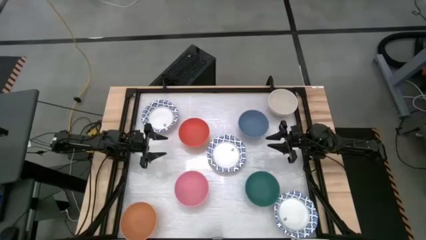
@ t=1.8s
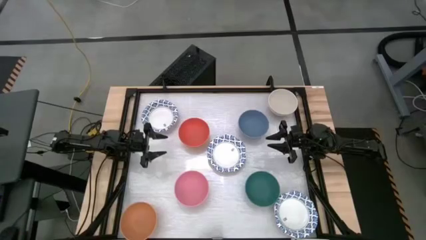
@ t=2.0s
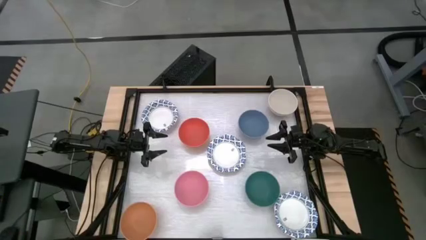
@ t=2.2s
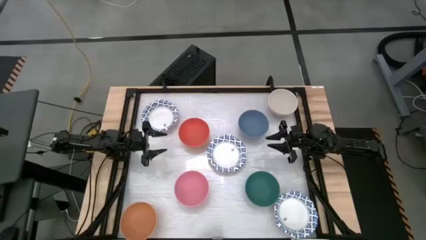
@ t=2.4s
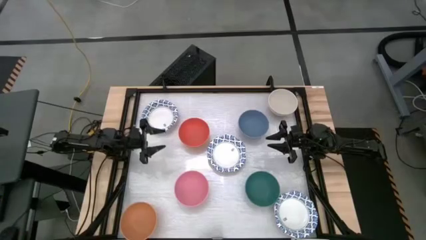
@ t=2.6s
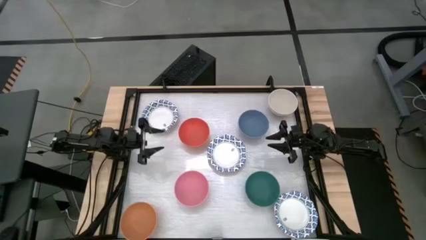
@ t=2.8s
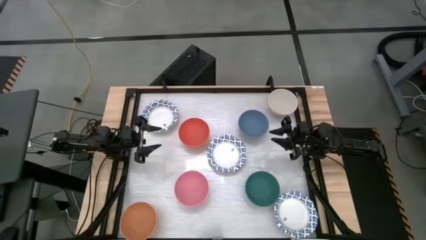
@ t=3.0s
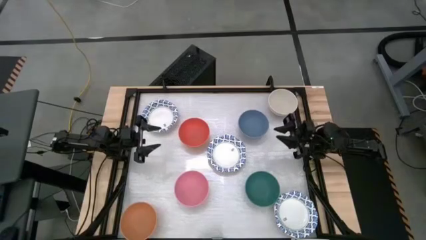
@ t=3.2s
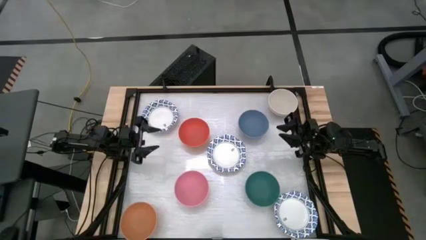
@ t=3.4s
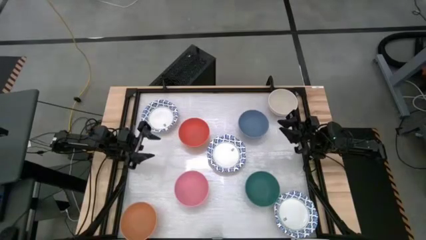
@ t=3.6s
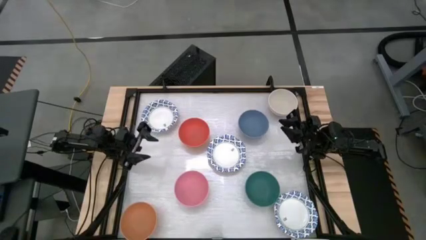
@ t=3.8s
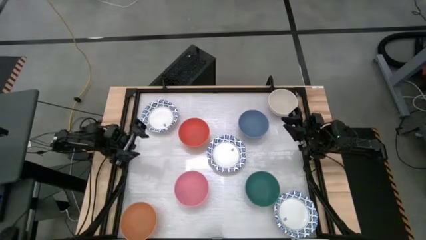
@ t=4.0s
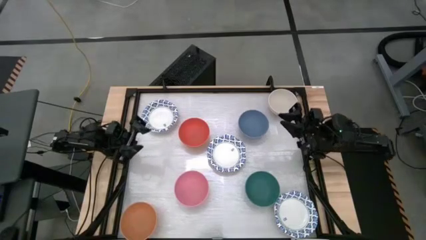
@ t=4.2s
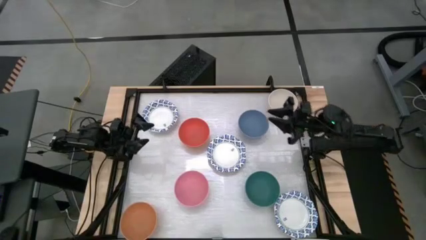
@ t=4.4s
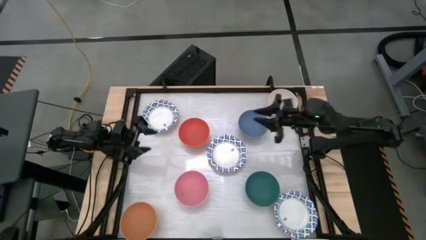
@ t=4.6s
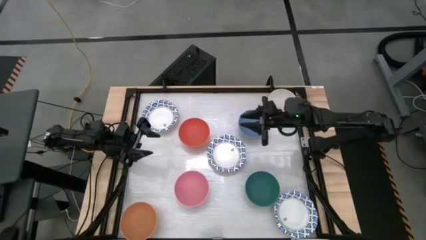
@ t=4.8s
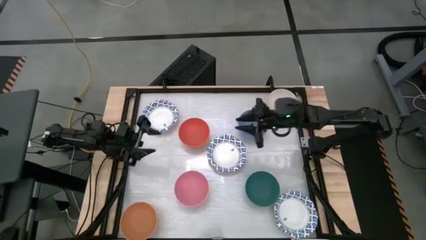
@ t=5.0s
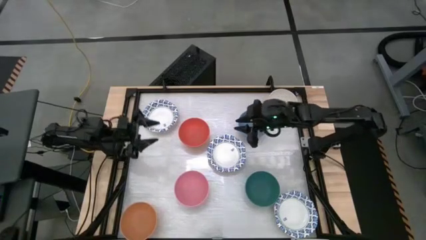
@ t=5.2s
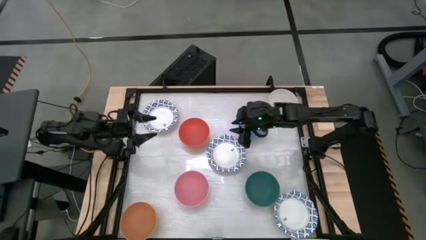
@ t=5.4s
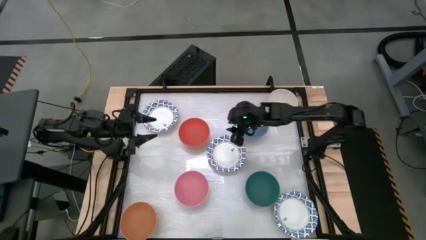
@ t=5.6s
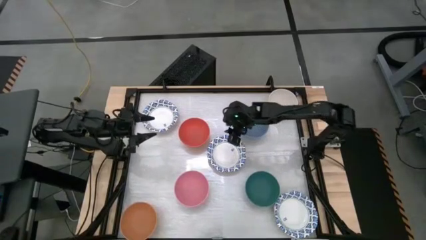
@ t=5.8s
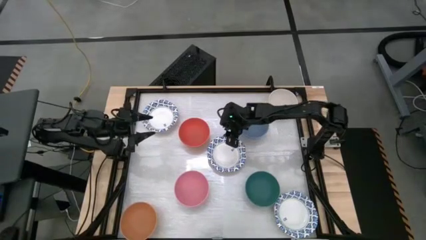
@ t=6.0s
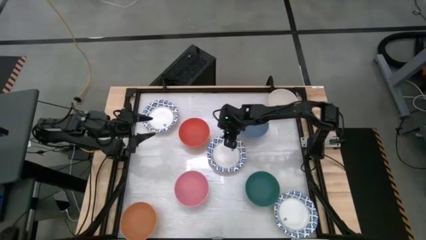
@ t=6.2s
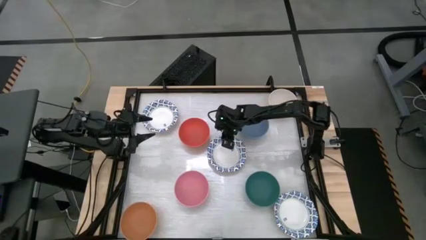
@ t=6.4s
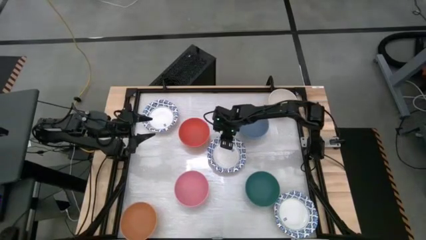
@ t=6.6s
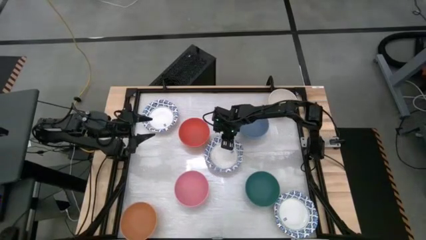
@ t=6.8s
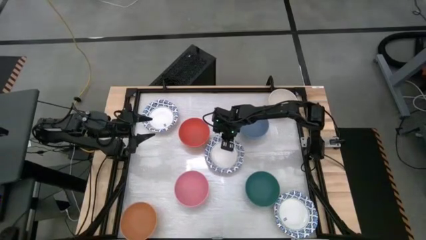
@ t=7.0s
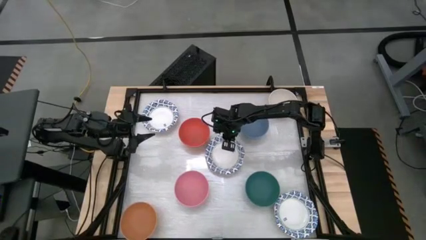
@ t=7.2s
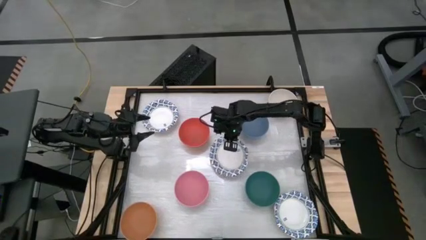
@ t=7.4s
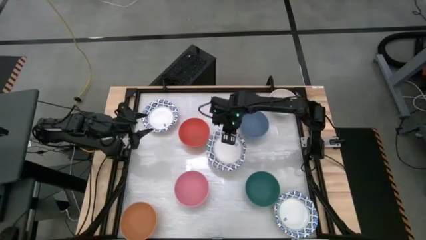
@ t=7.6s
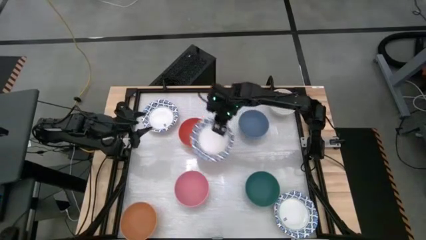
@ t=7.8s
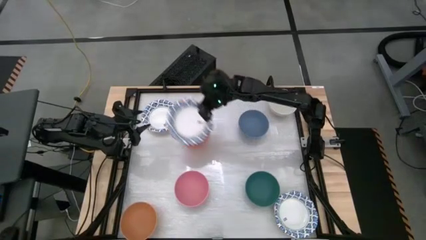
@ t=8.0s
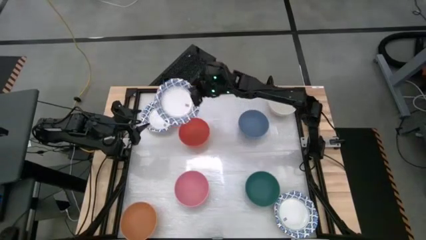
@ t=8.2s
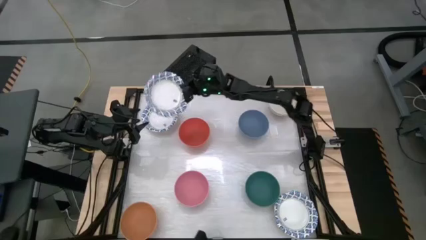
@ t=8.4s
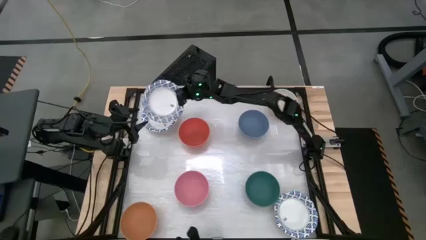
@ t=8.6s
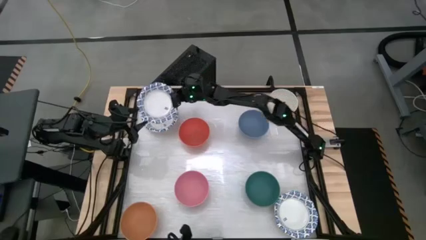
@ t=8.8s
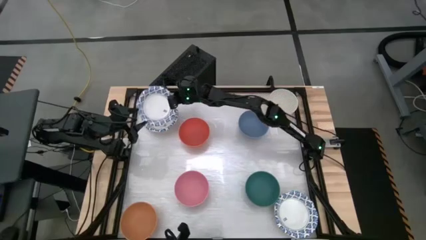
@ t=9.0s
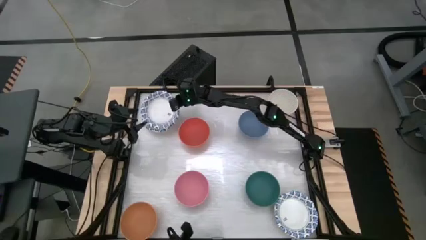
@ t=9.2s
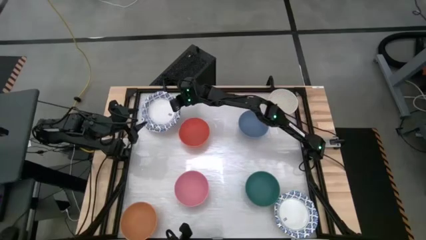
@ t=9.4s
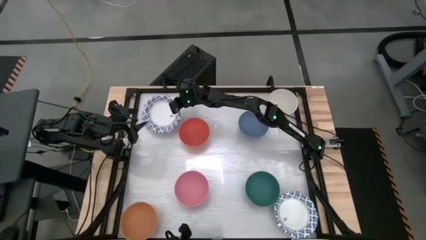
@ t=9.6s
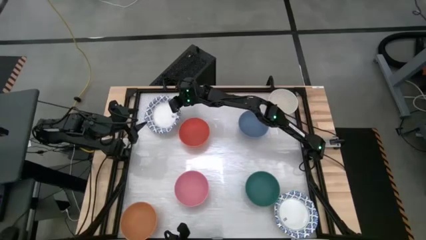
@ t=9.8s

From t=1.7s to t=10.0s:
Stack the middle white pattern bowl on top of the top white pattern bowl

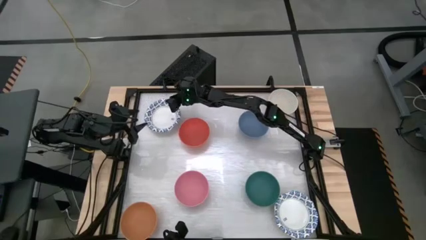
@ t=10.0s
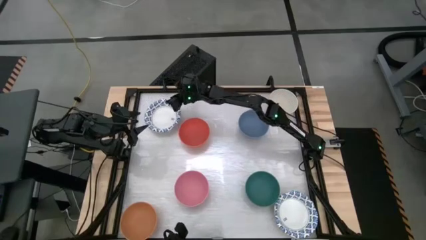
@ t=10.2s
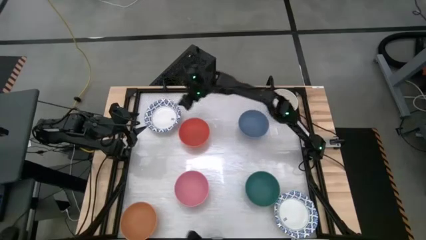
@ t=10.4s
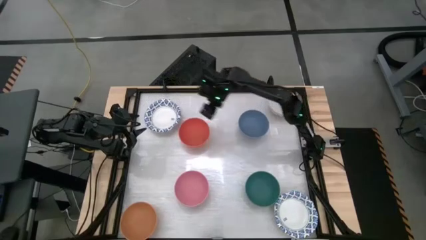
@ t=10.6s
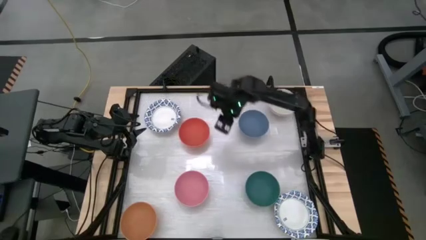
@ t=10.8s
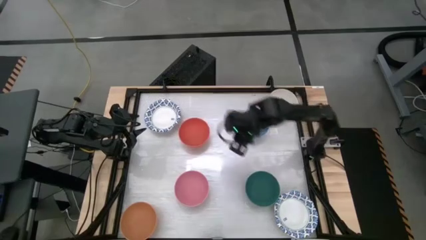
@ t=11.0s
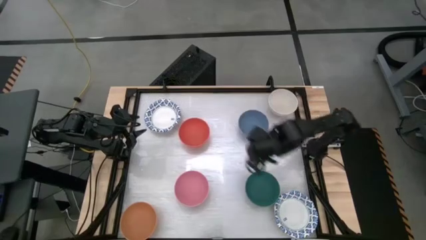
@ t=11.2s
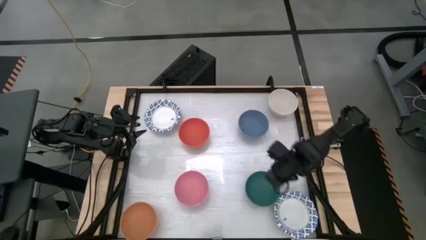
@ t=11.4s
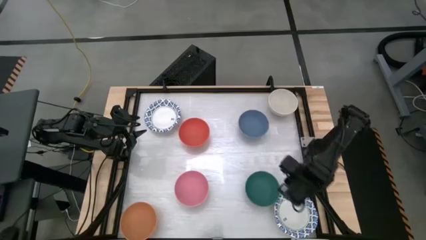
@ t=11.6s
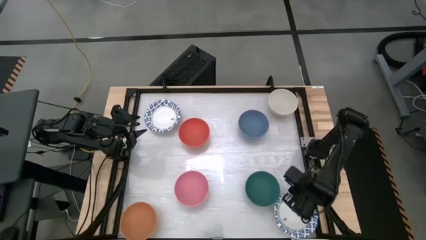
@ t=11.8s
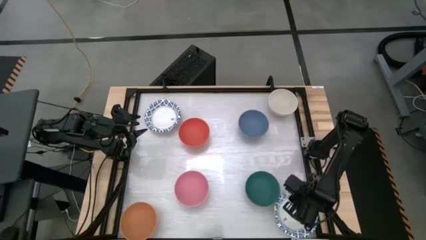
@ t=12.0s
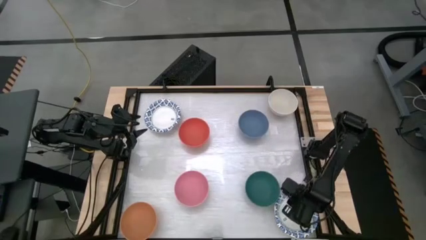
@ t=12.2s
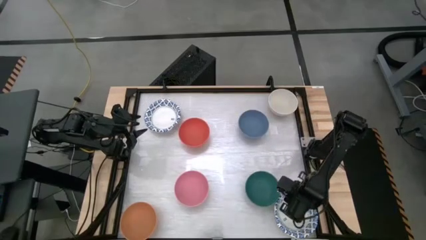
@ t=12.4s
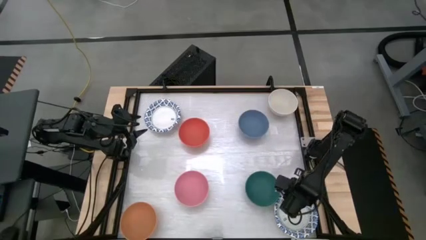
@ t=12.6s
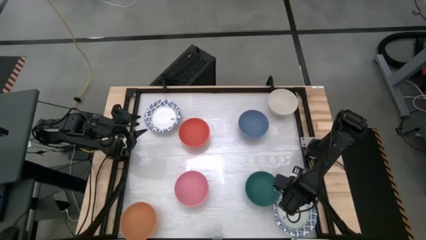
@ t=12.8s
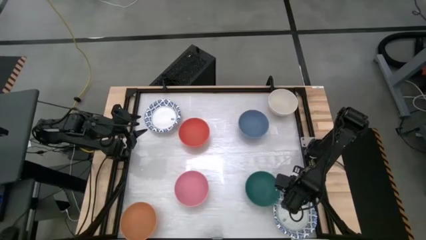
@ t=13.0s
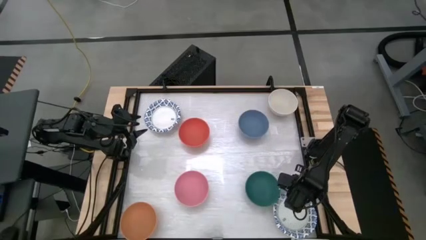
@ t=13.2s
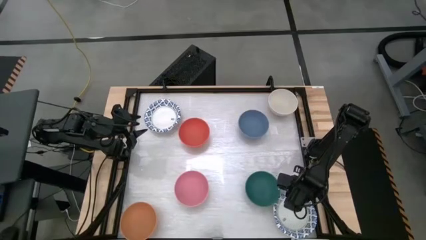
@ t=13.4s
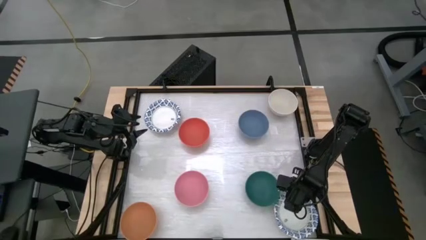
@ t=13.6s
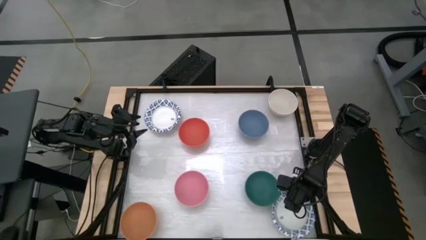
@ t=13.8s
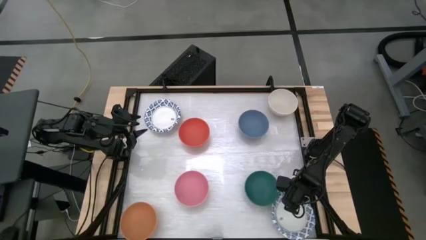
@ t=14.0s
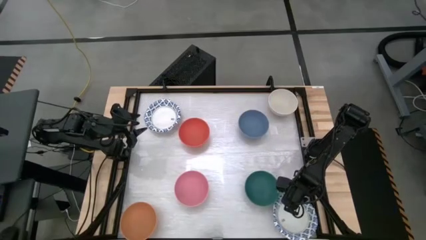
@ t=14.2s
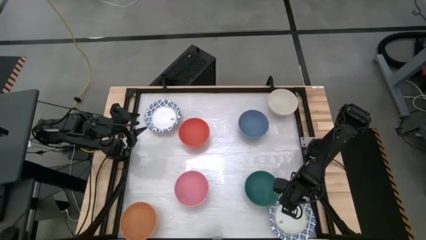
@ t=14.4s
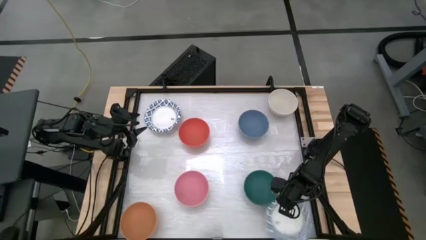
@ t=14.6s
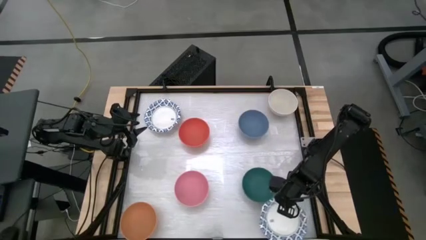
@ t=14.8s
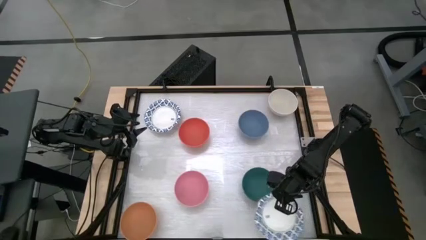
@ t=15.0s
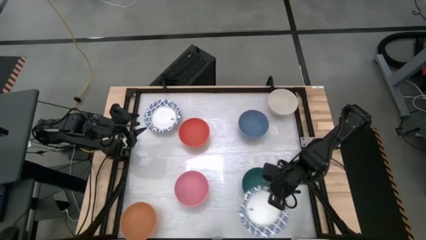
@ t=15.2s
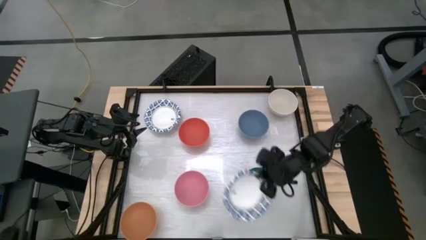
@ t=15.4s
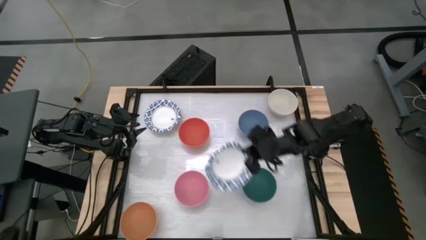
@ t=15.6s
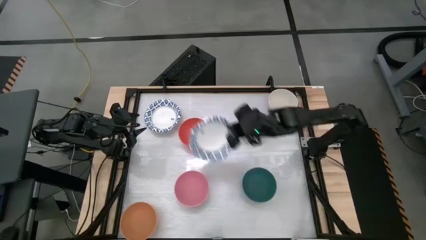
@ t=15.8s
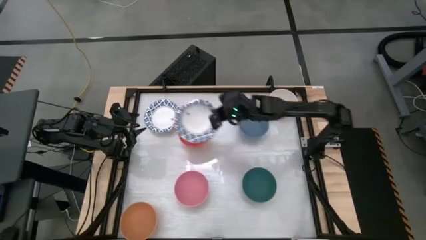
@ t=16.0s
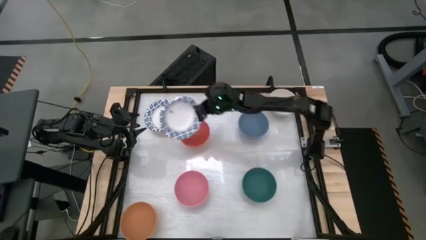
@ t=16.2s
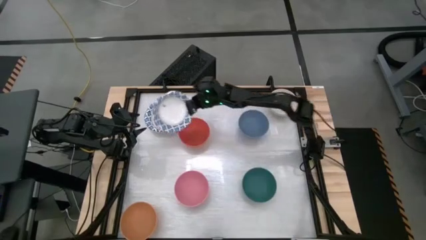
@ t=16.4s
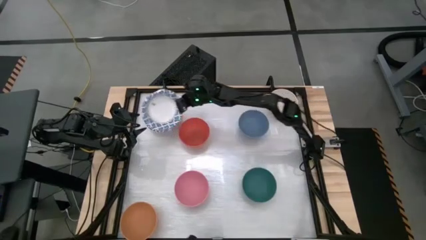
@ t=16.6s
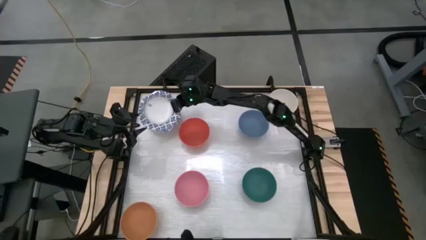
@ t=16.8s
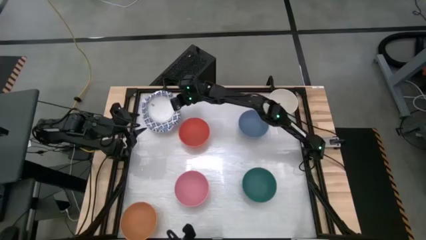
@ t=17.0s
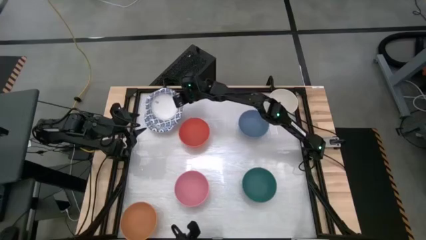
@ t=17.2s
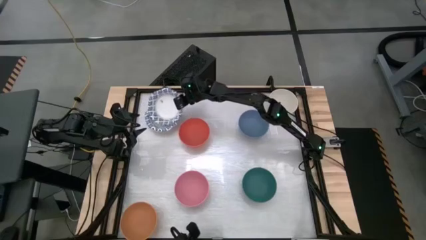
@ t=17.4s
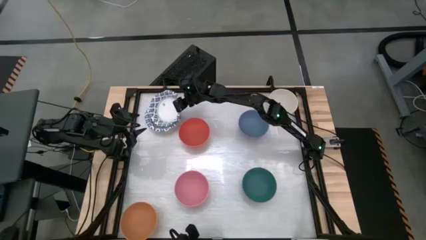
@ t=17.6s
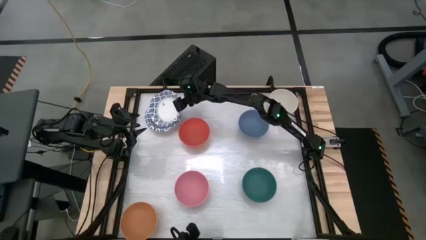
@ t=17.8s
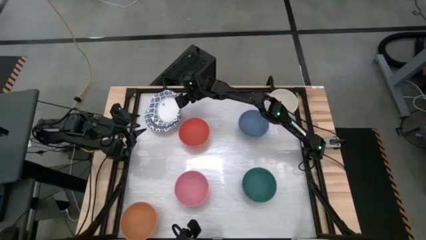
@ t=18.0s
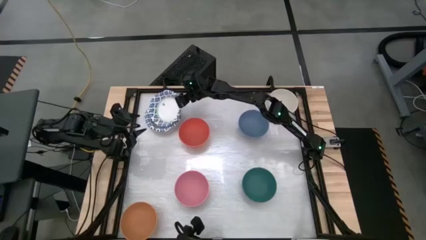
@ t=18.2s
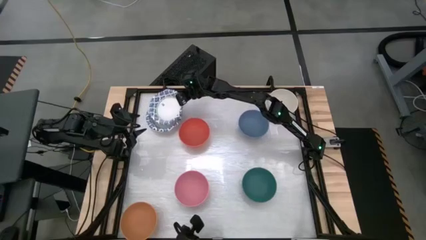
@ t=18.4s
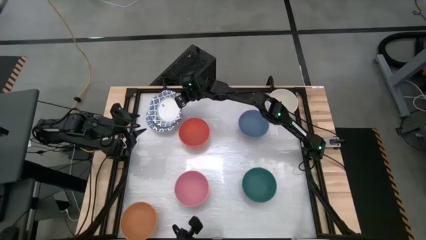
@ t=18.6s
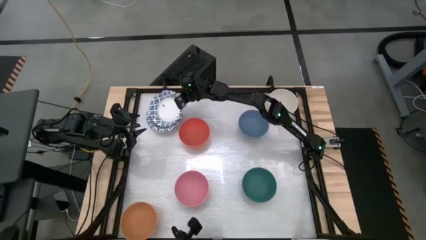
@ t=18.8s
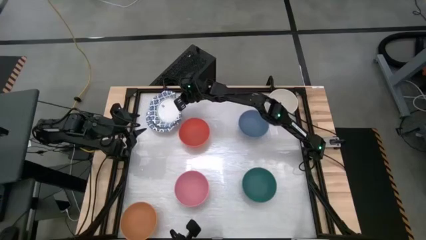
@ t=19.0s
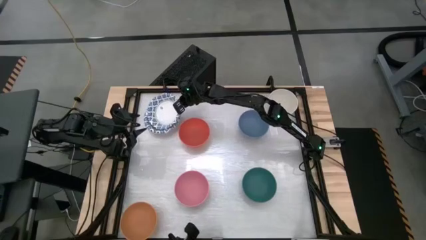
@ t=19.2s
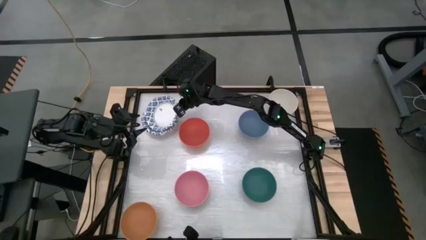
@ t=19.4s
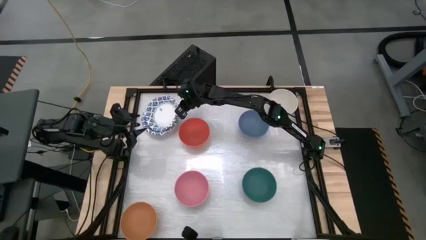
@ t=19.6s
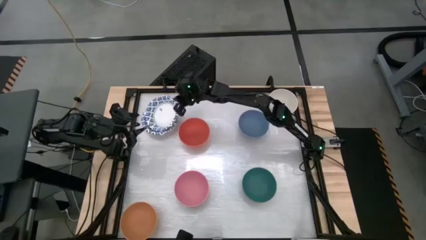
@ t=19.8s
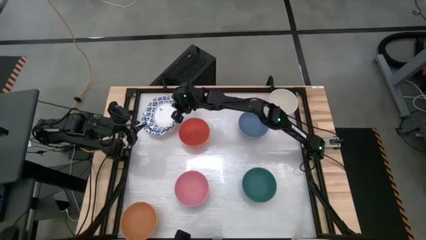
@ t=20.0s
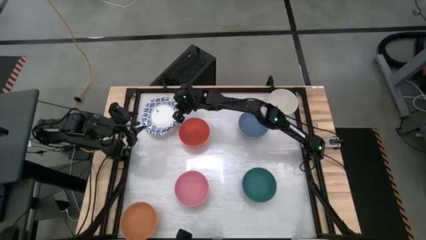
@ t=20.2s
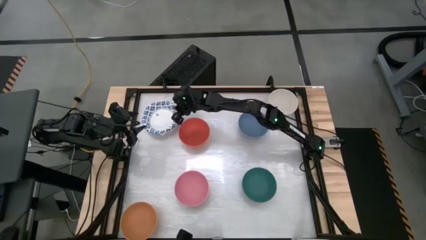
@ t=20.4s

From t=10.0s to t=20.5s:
Stack the white pattern bowl on top of the white pattern bowl
